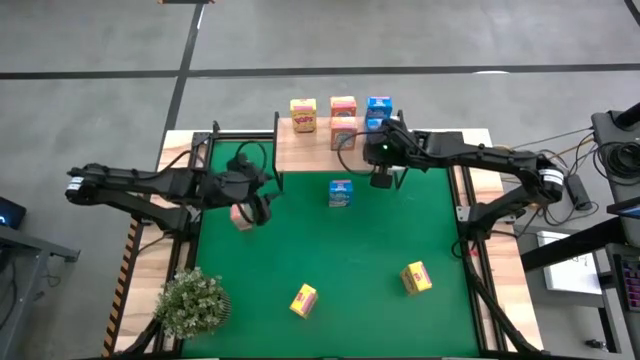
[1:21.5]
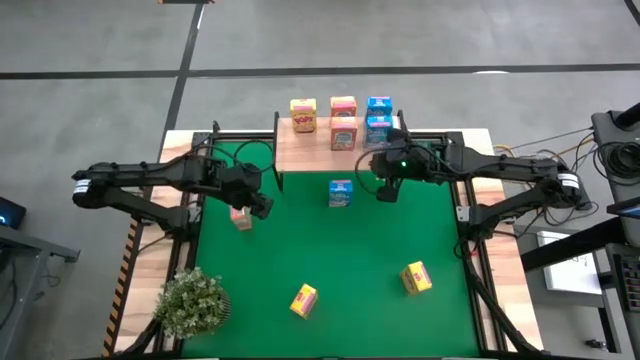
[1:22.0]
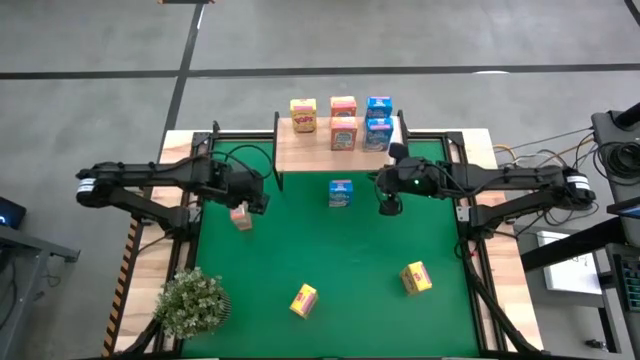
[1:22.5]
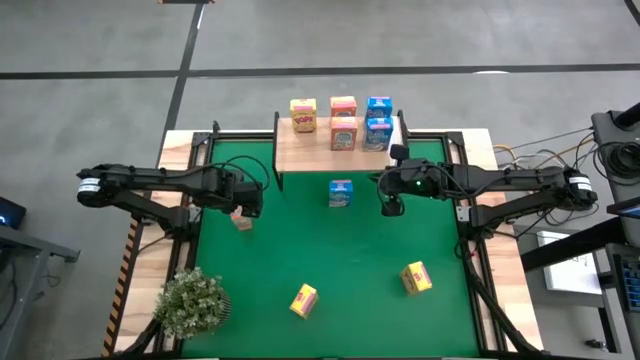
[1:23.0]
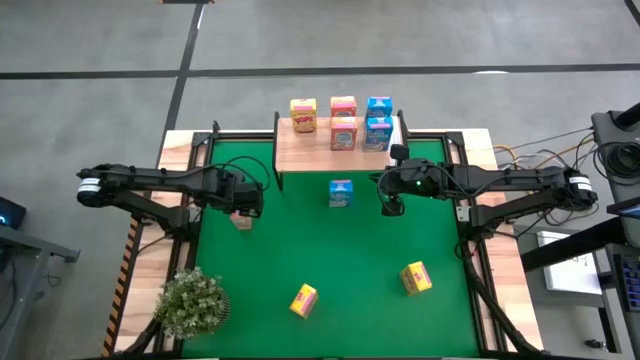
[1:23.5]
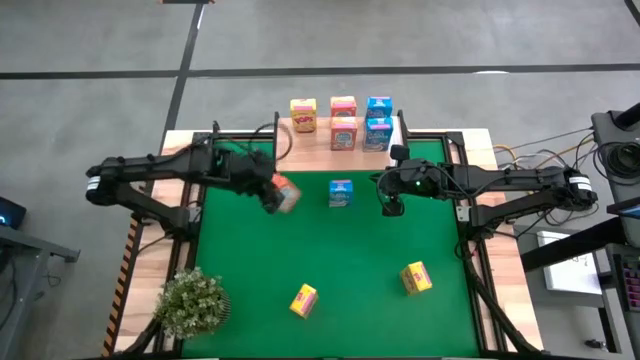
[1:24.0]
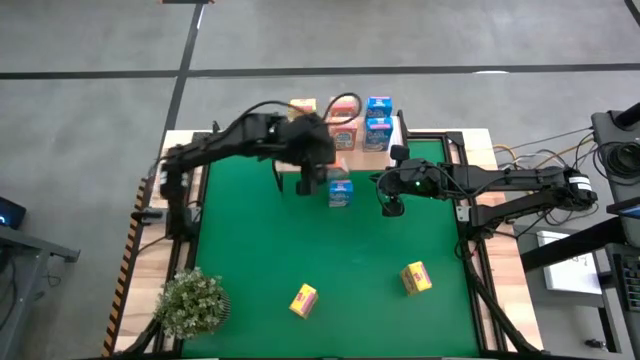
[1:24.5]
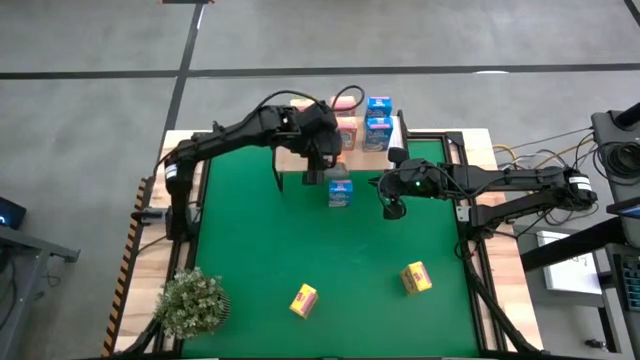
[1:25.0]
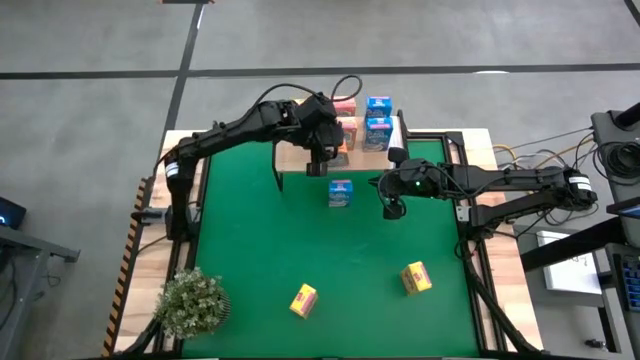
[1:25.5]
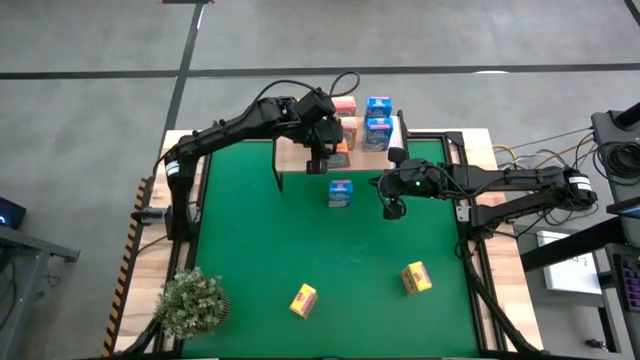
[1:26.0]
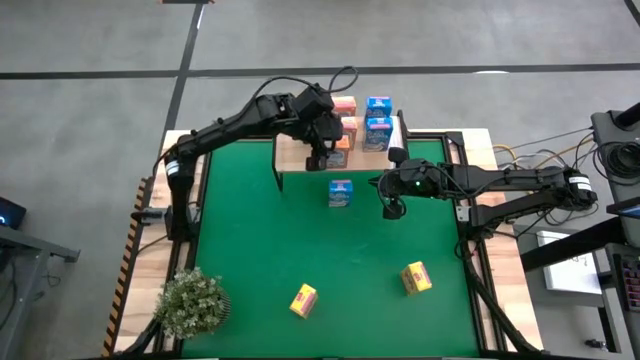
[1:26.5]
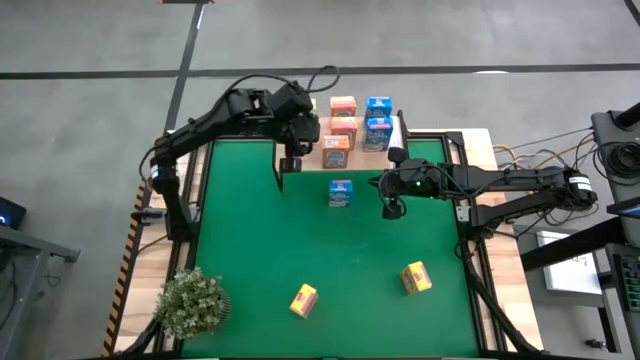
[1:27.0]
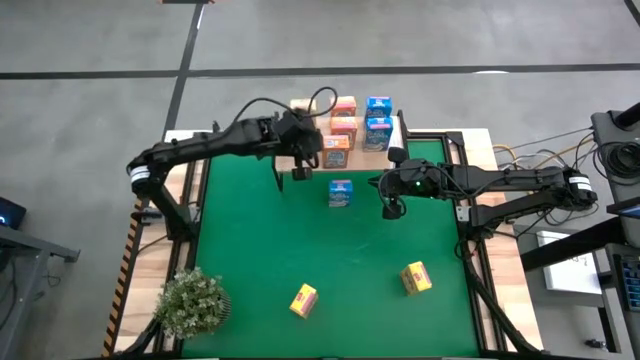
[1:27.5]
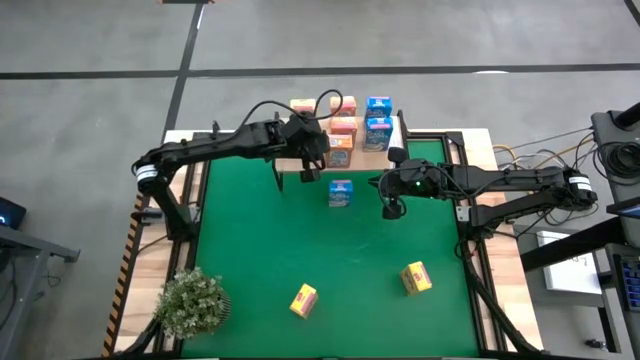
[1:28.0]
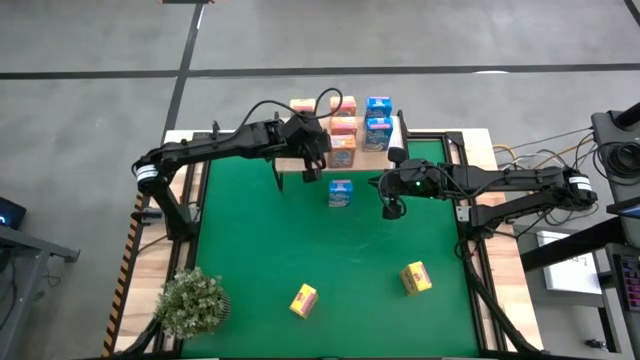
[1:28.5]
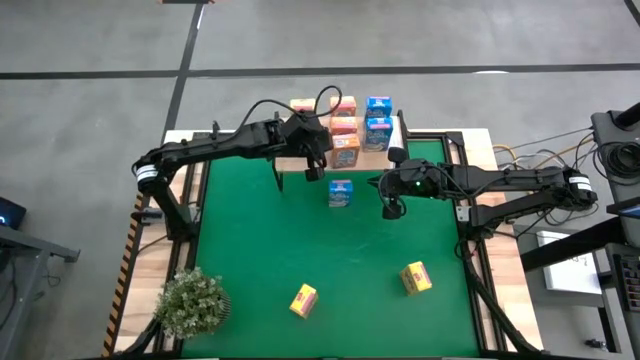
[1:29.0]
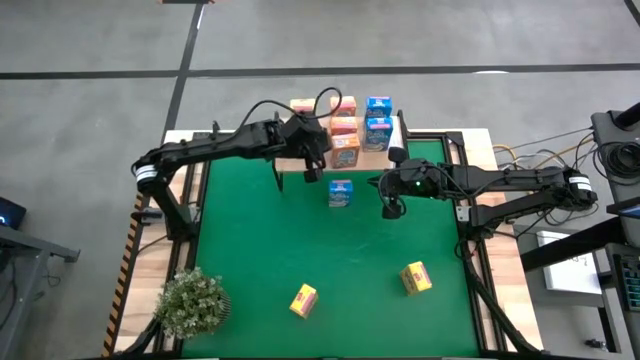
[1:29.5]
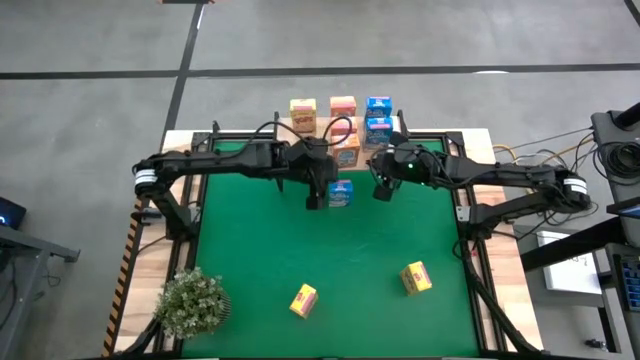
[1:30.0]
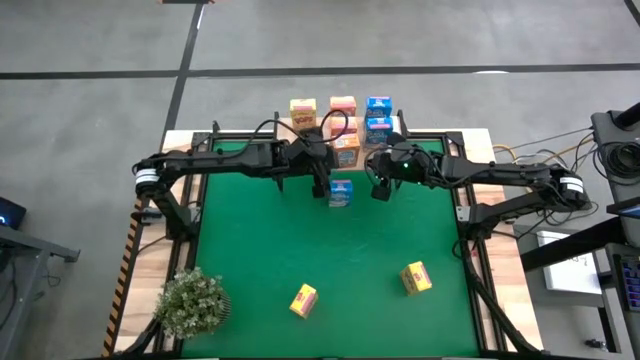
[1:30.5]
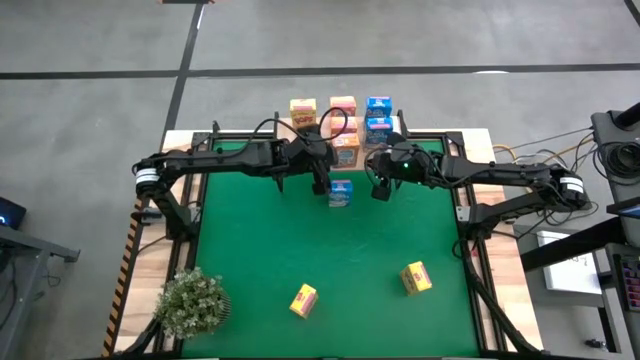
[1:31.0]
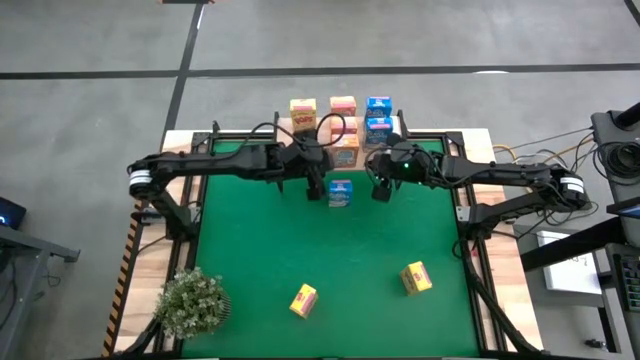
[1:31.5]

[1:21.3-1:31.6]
Task: Stack cereal on shelf
Put the orange cereal box on the shelf aligned with the other orange cereal boxes

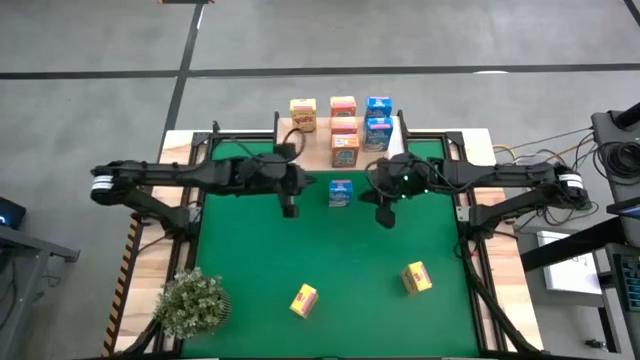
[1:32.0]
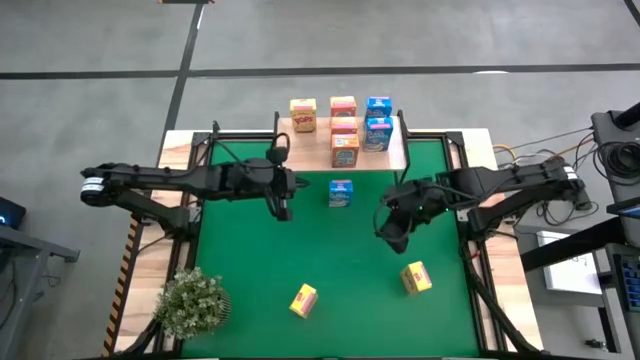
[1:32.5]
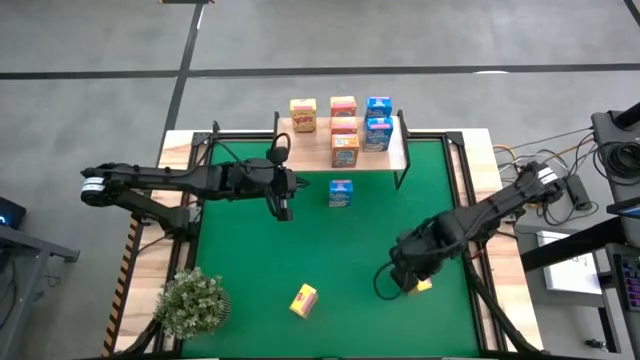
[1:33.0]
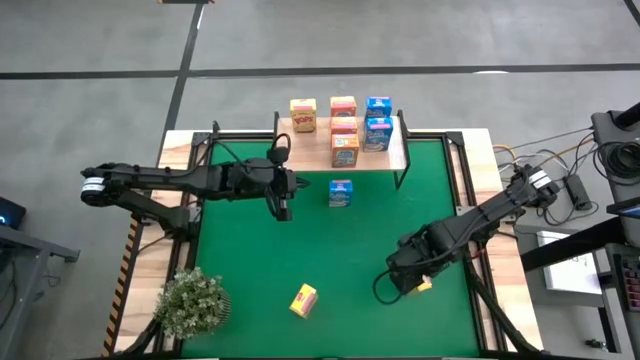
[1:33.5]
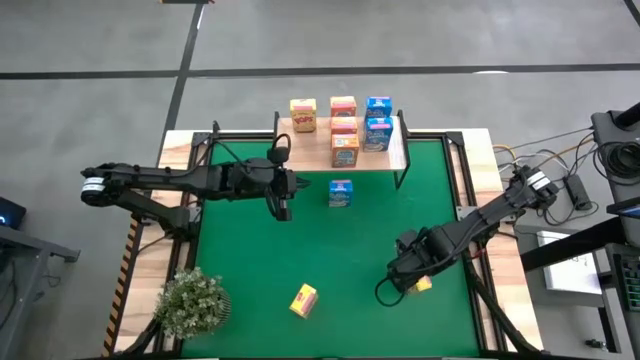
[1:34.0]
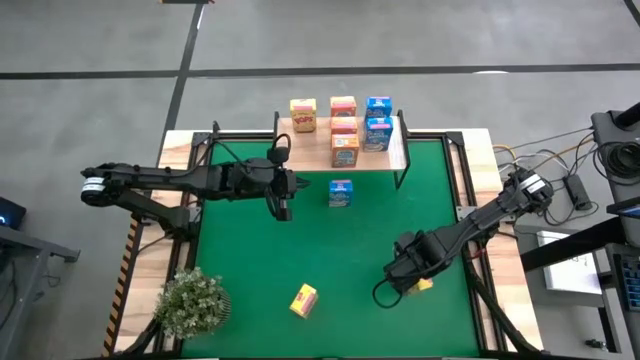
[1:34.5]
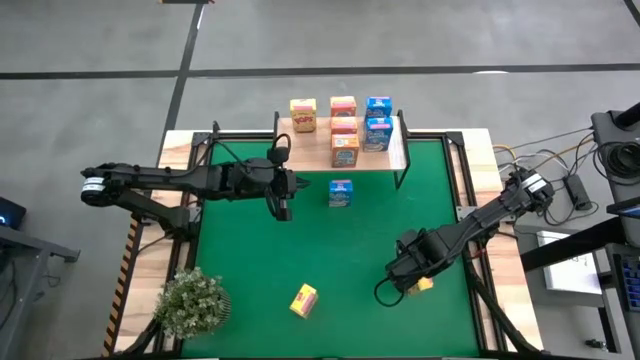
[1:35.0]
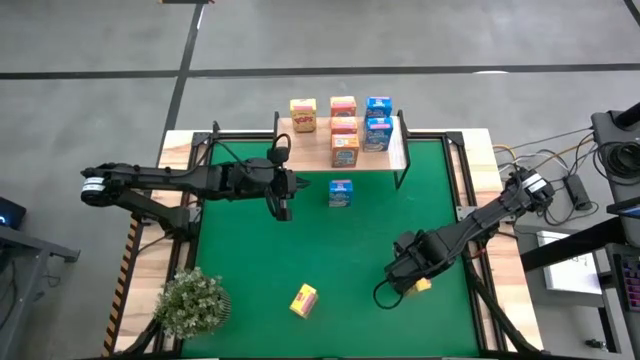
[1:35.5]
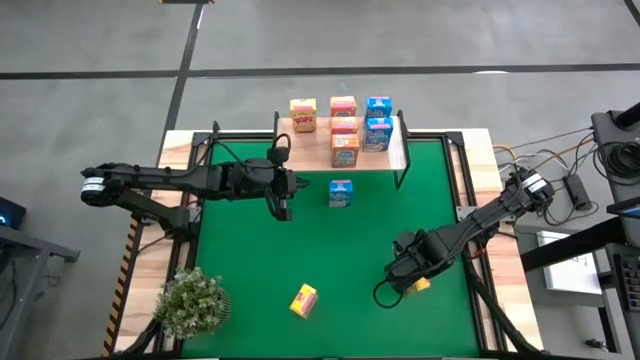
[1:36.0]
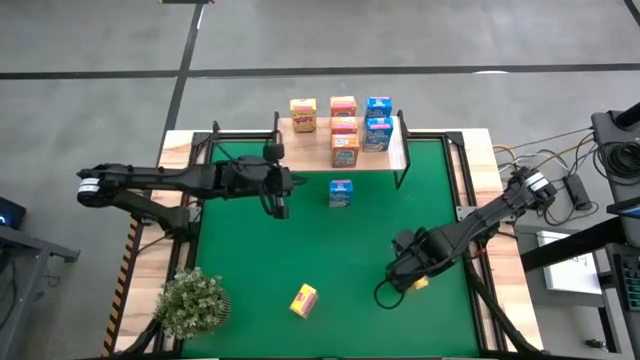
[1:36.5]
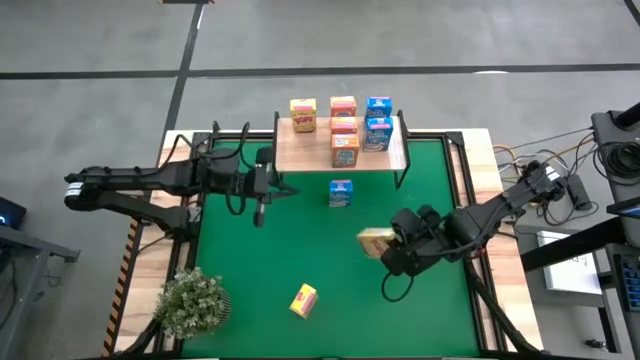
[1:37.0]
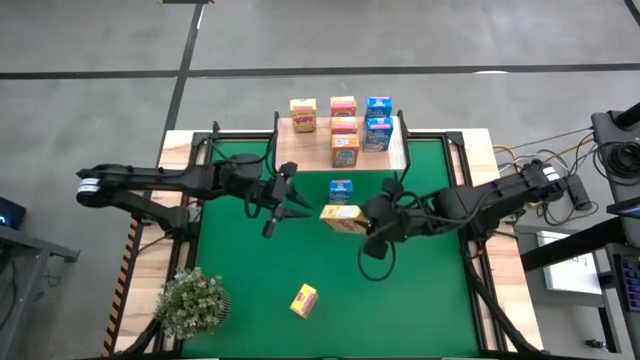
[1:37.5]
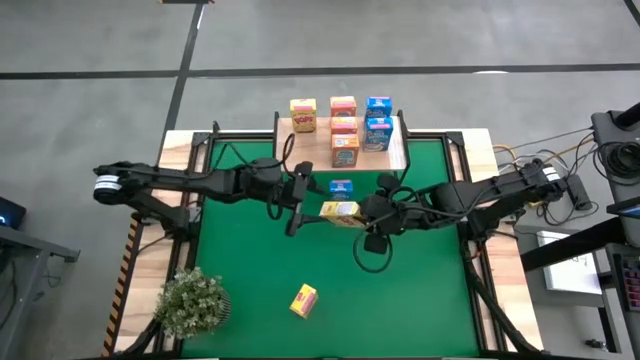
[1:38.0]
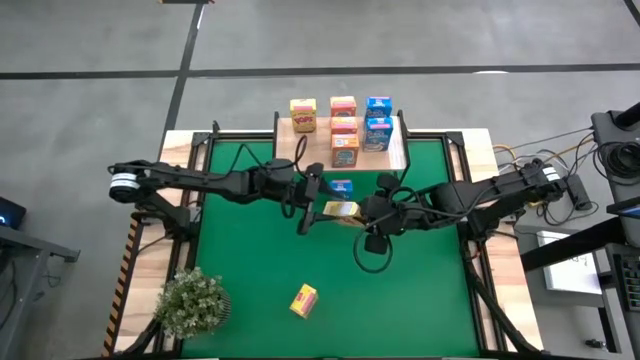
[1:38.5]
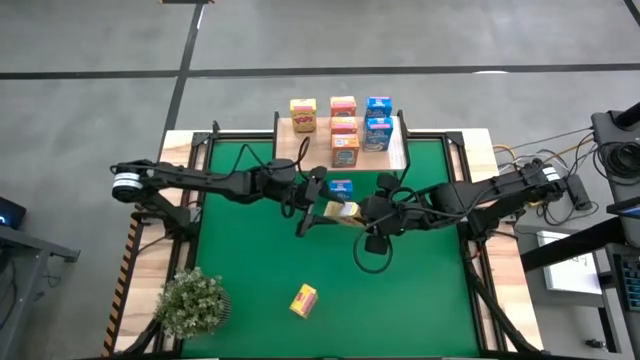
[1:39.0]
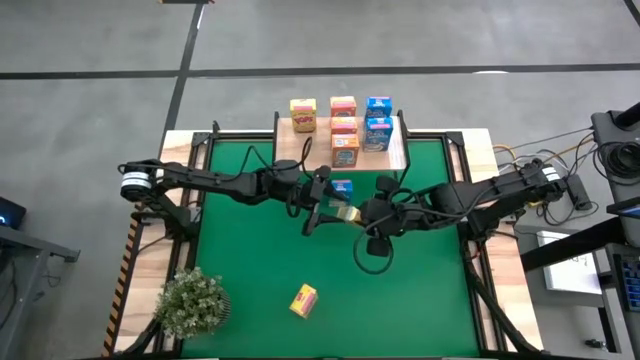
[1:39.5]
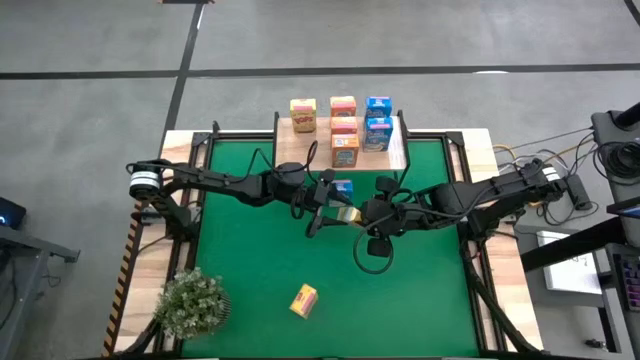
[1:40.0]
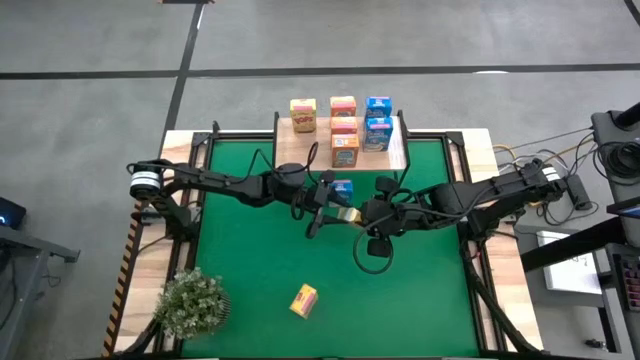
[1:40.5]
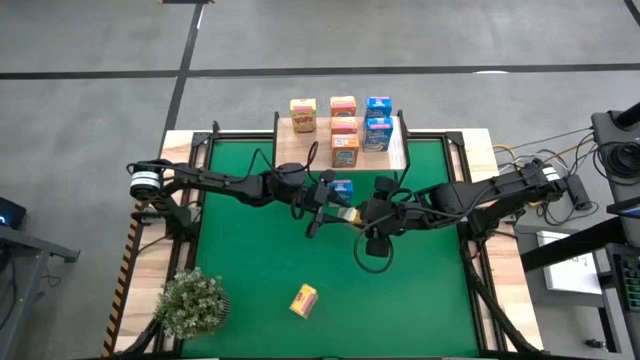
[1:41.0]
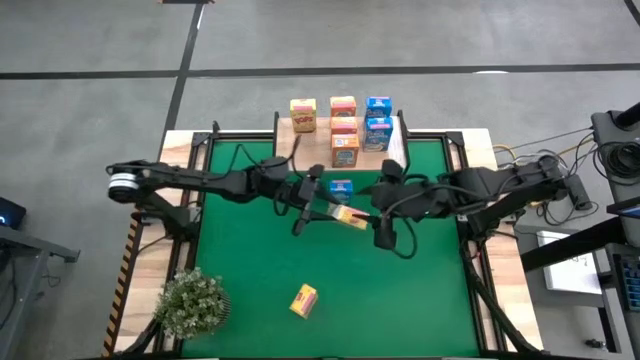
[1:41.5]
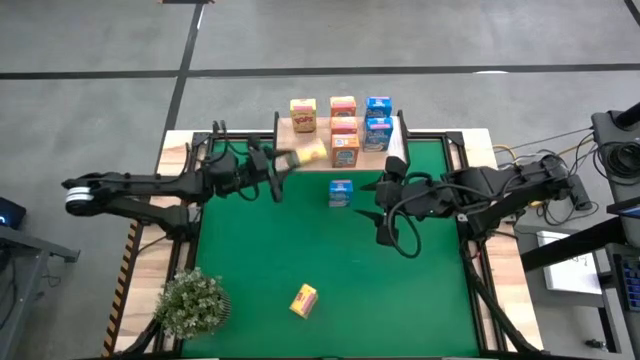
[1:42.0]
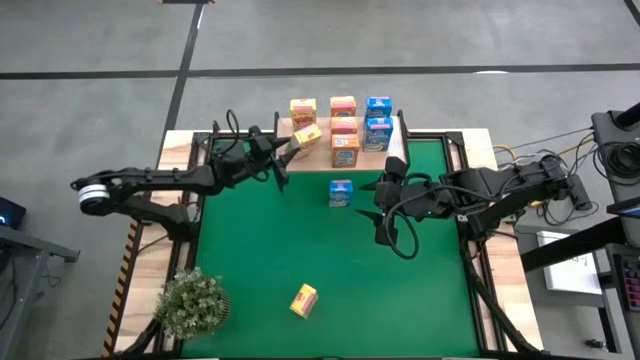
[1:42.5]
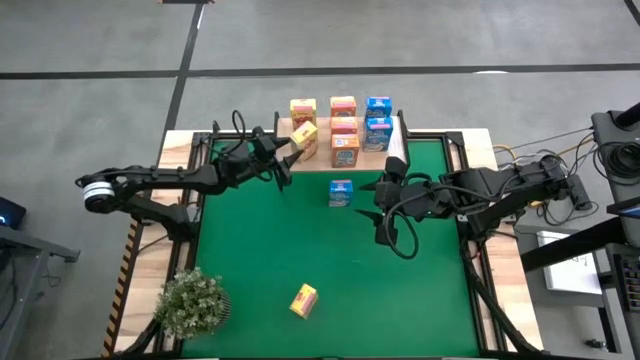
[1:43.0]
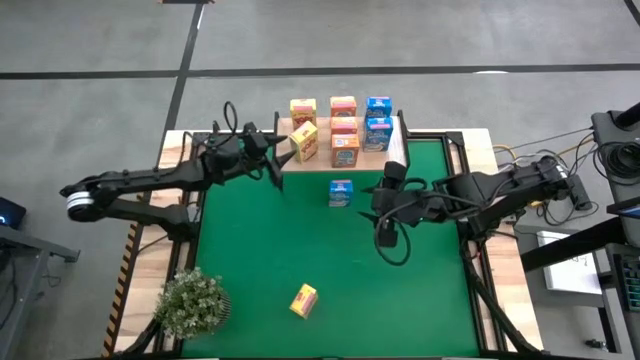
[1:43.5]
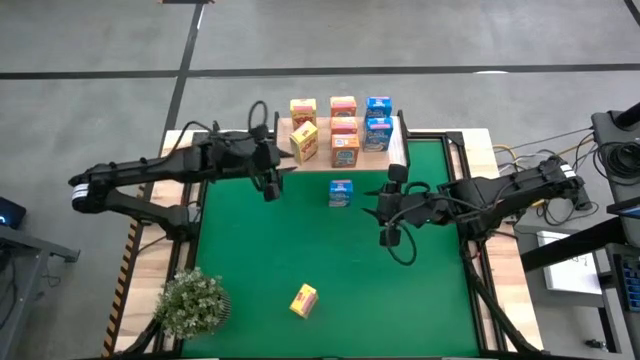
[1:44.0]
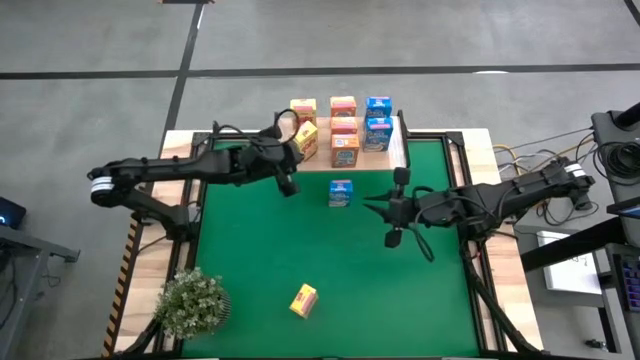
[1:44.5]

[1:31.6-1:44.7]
Put the right yellow cereal box on the shelf aligned with the other yellow cereal box
